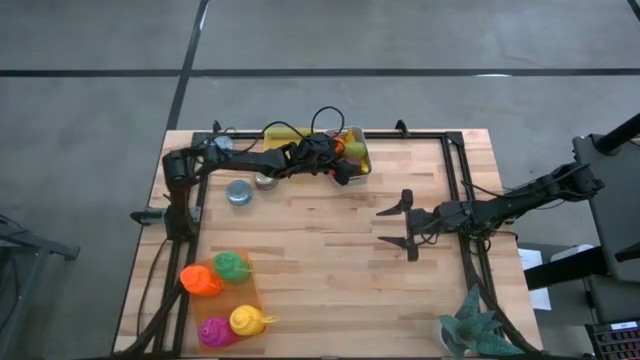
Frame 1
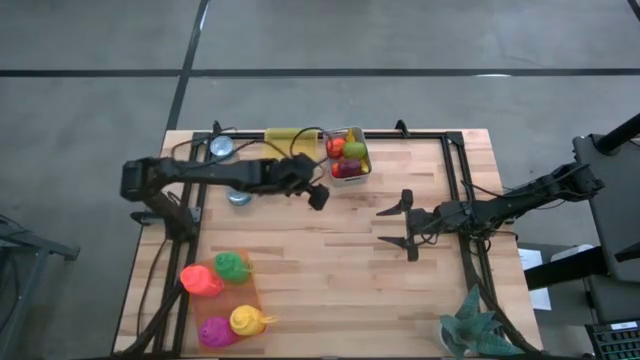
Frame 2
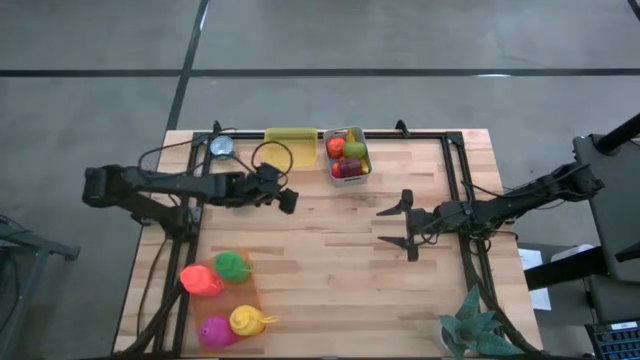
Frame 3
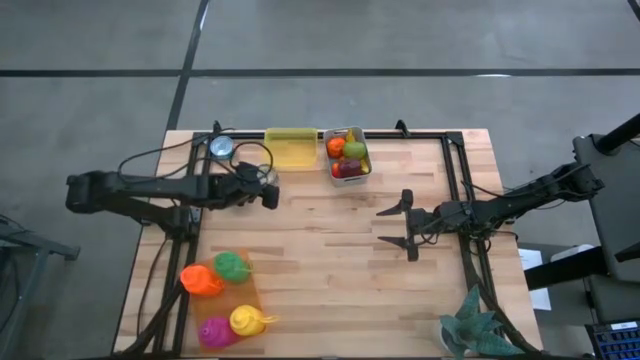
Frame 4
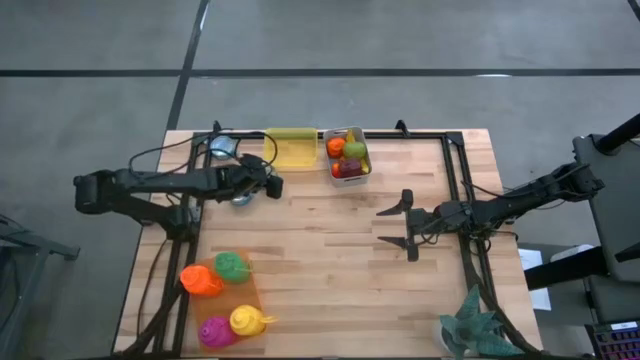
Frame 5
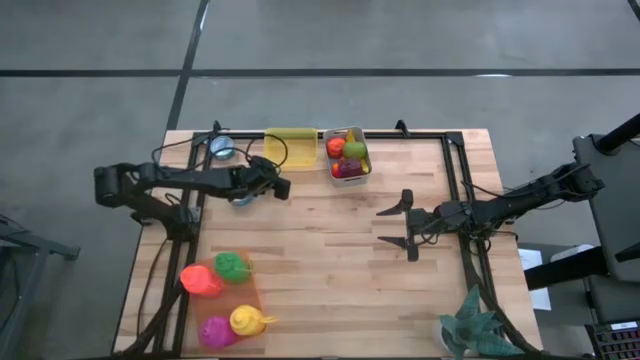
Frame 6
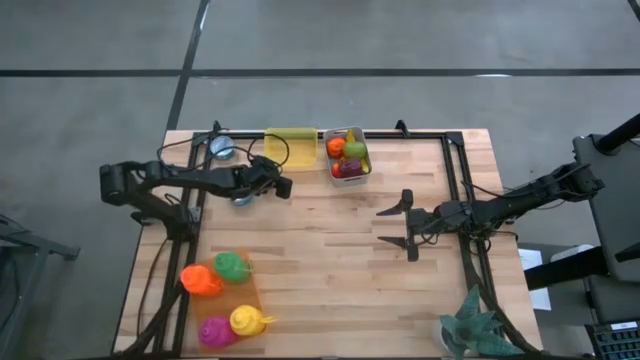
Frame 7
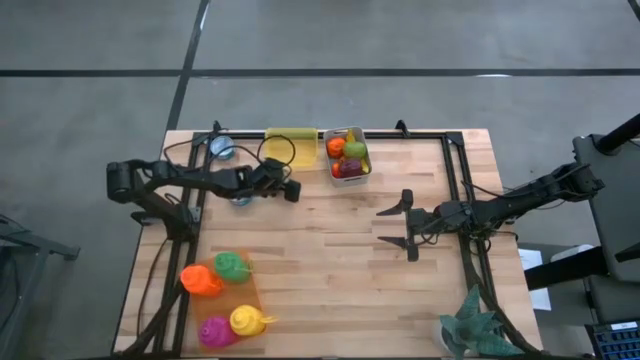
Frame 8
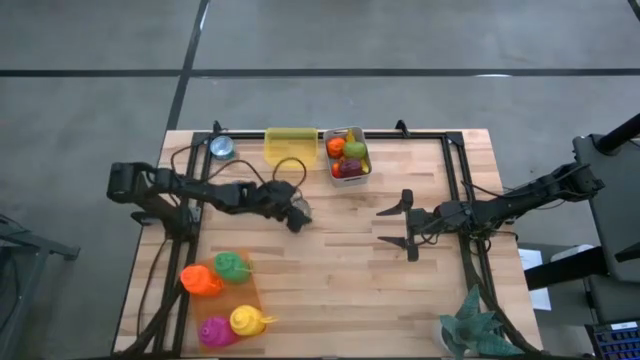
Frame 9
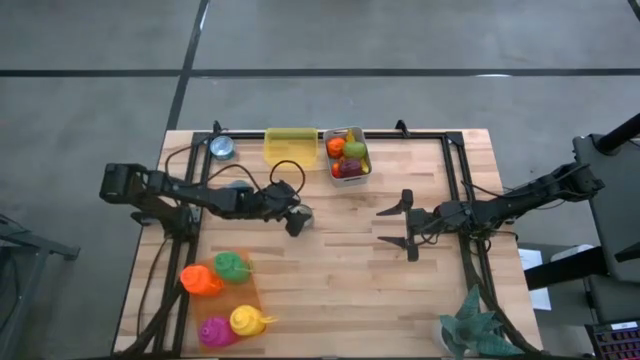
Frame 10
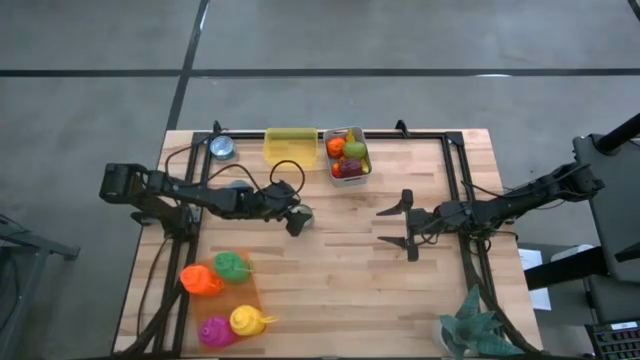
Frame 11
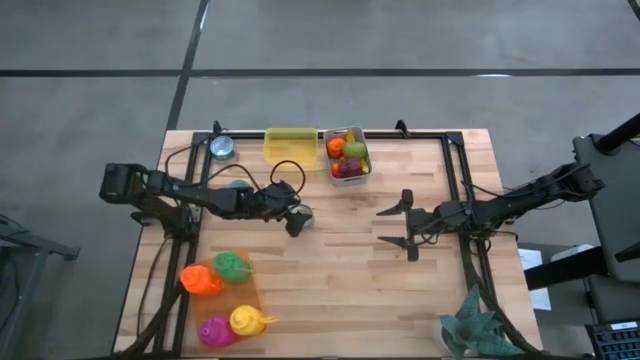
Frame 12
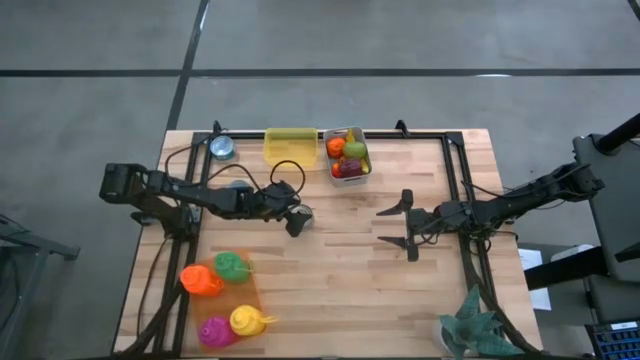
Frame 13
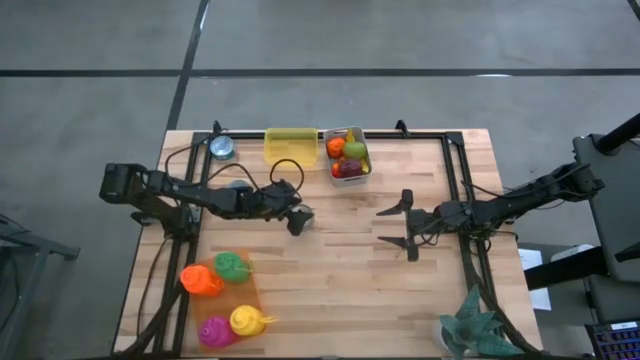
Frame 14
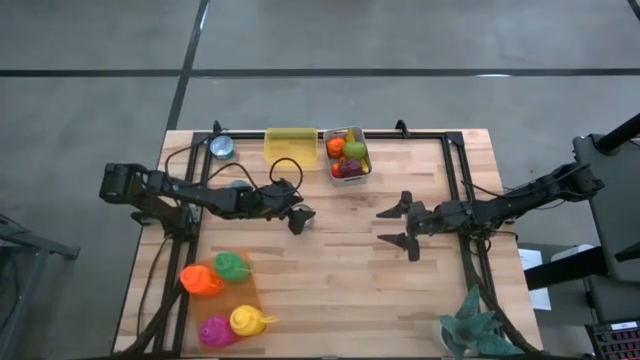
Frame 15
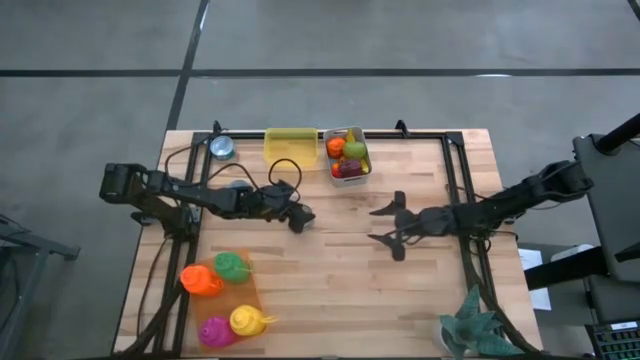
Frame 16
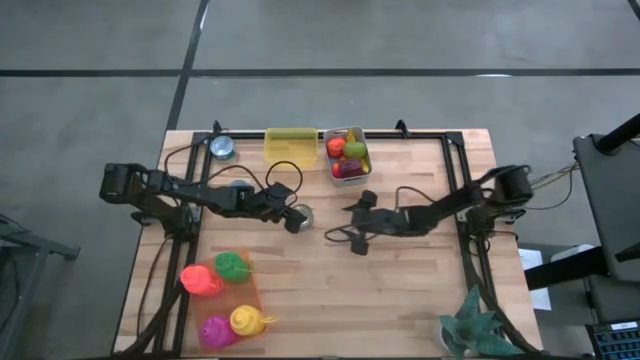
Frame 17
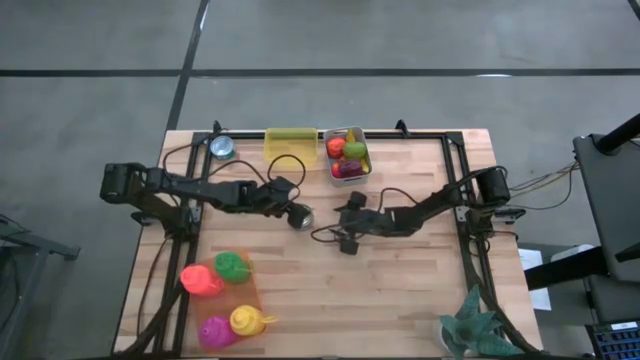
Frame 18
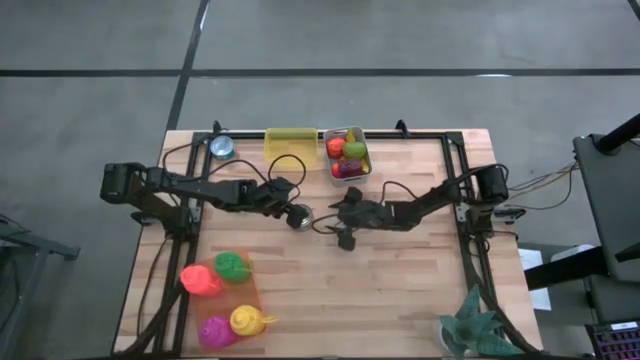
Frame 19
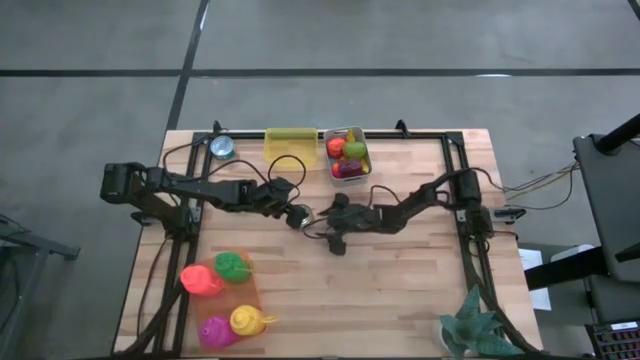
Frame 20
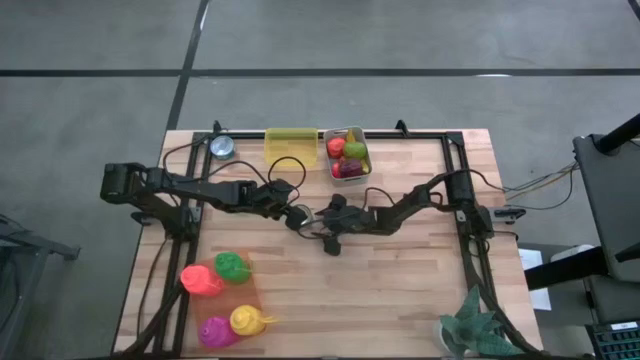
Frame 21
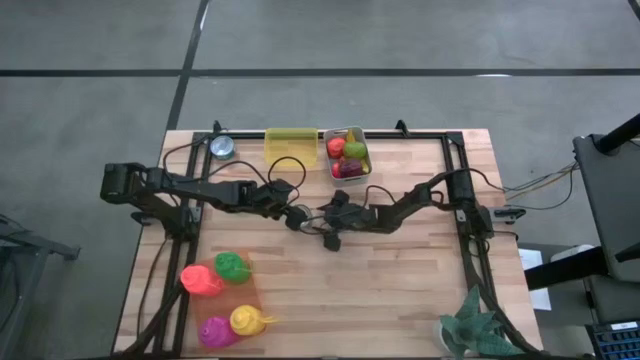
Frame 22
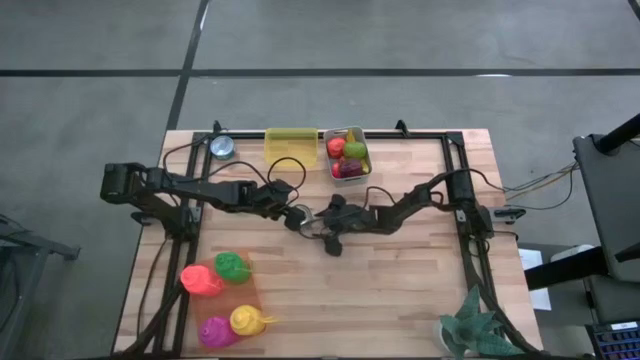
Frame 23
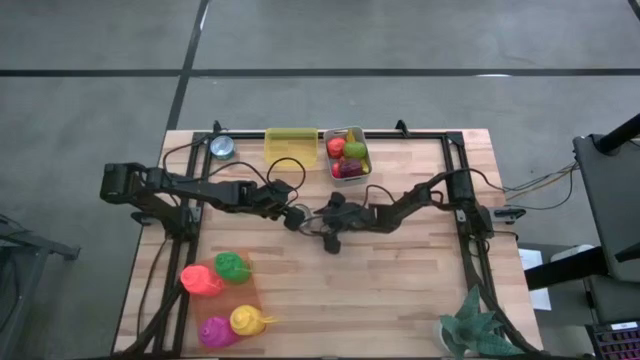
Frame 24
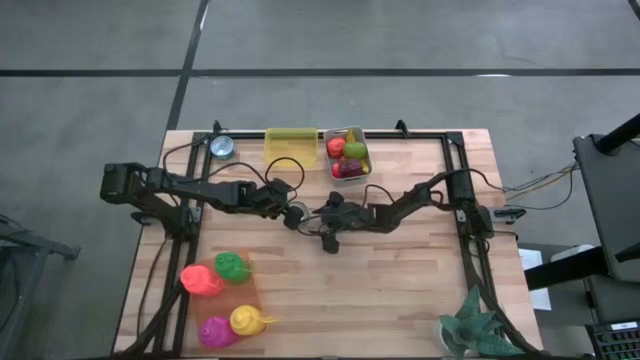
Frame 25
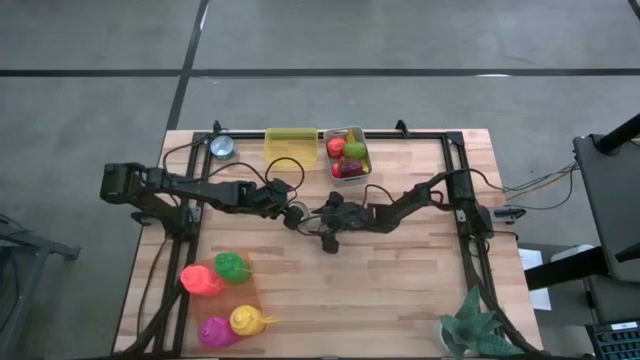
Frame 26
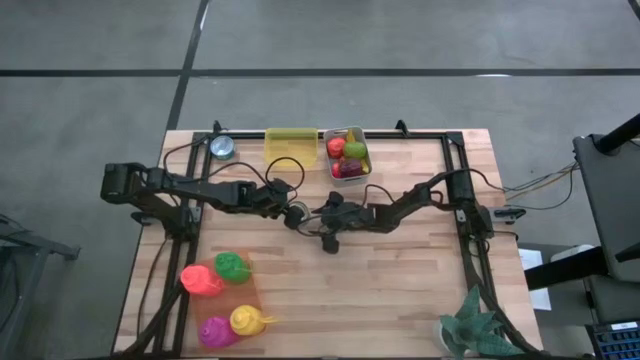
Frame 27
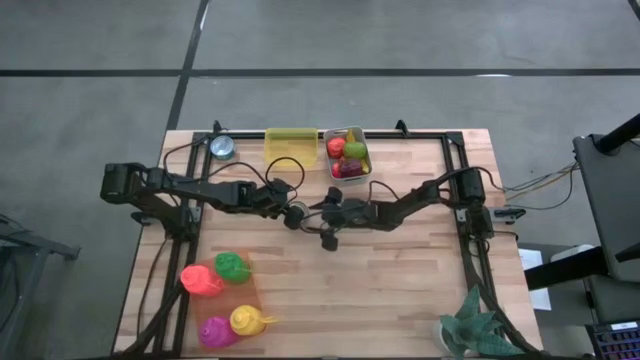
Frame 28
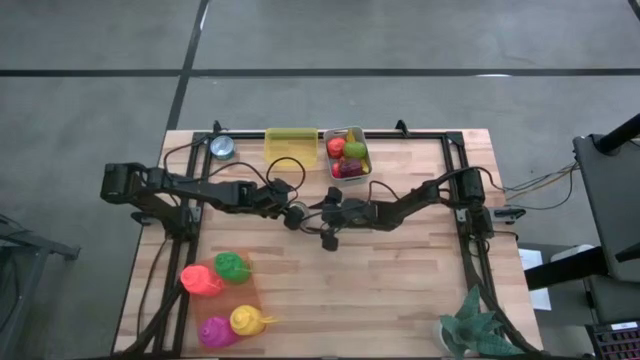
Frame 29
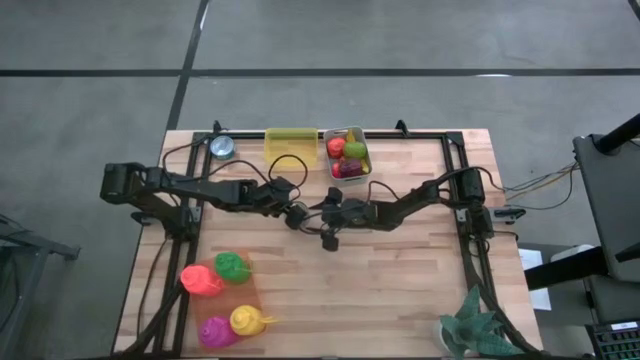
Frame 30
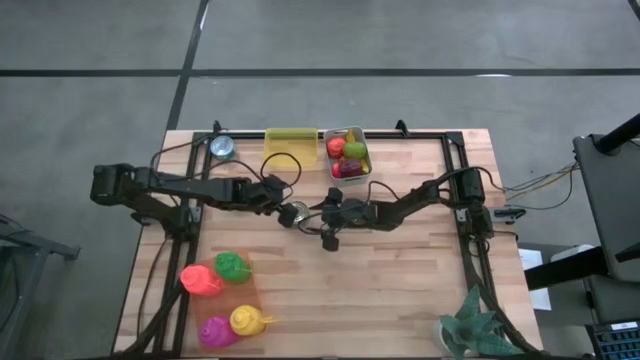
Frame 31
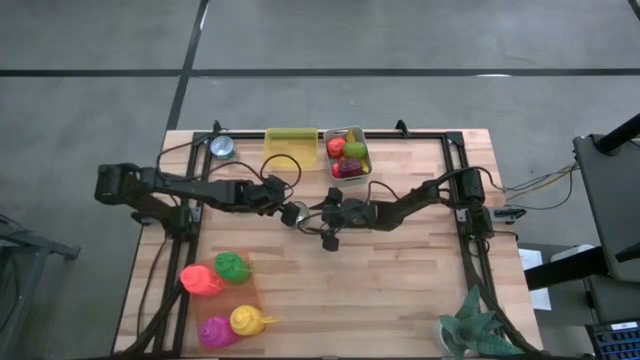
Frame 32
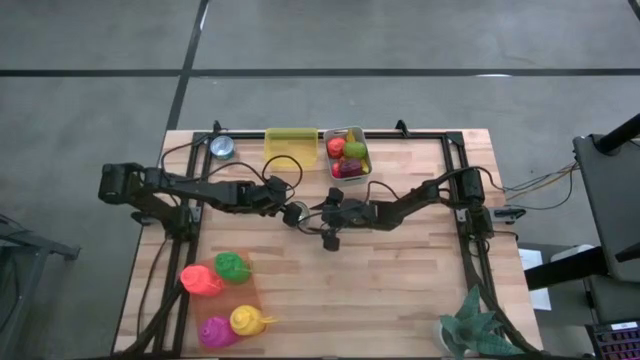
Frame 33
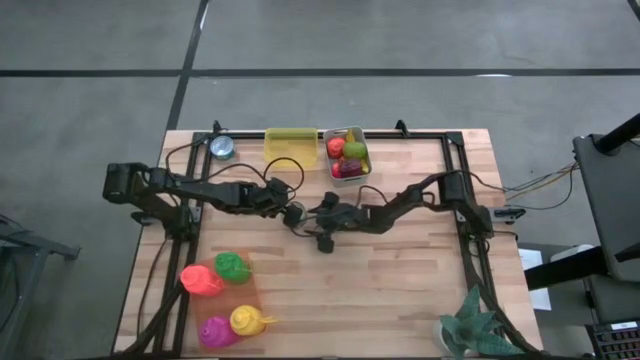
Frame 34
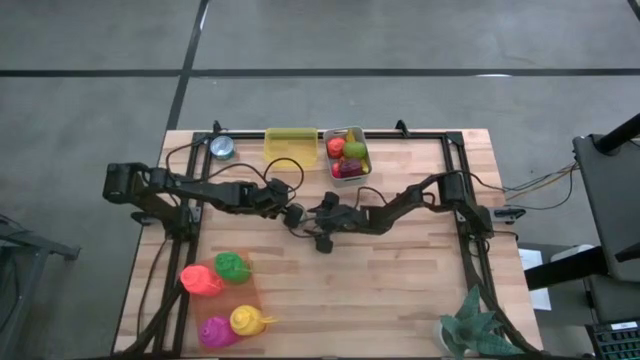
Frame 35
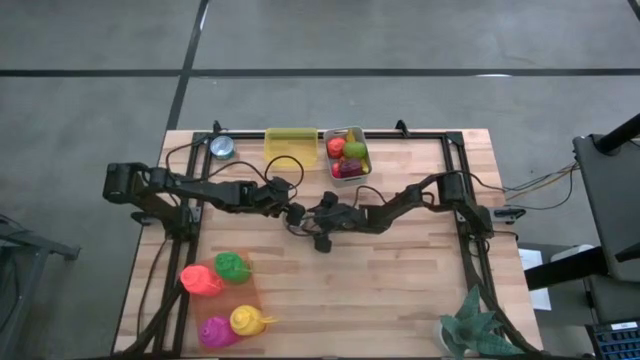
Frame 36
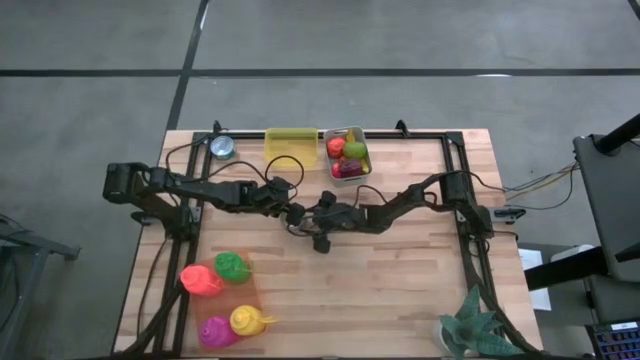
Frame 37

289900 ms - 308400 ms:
Task: Pick & Place Food Item
Put the blue and pink tuna can into the yellow bin

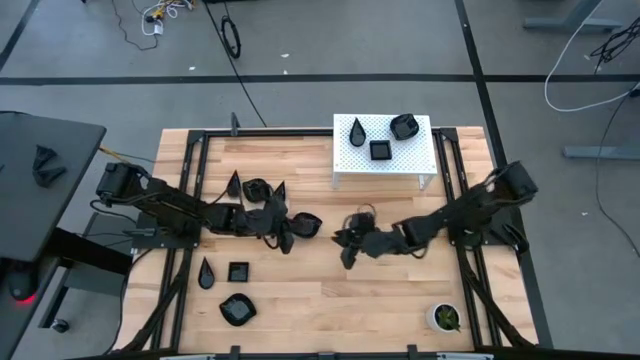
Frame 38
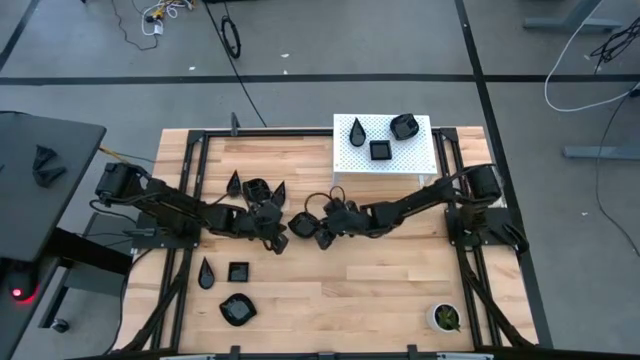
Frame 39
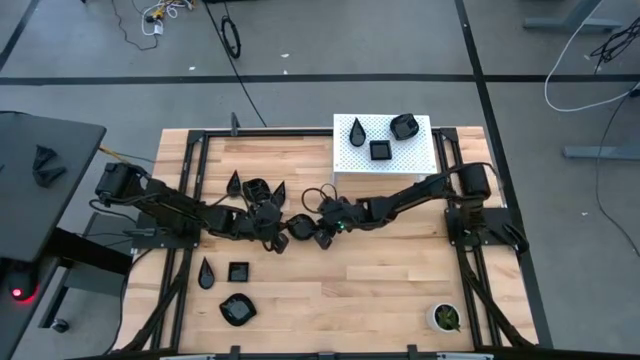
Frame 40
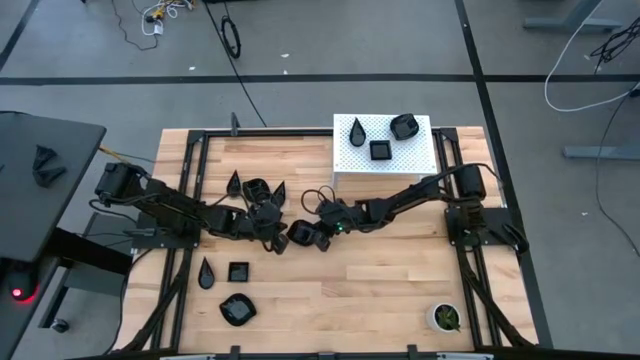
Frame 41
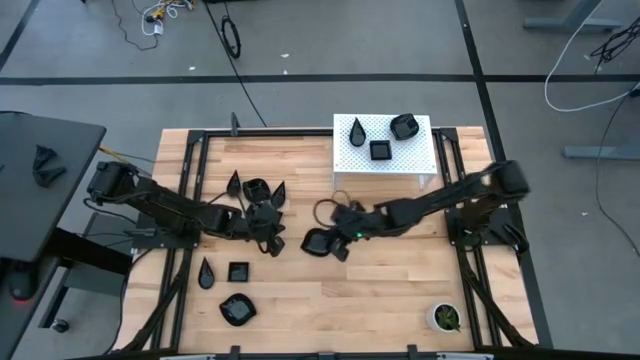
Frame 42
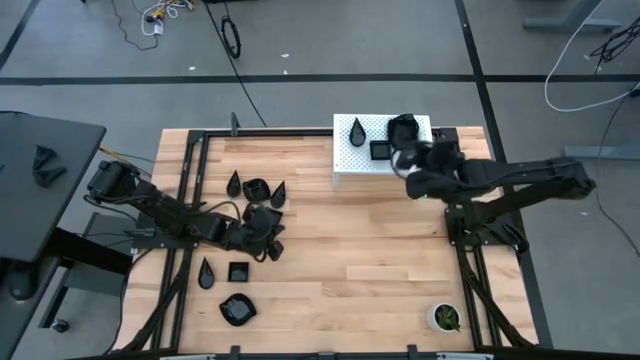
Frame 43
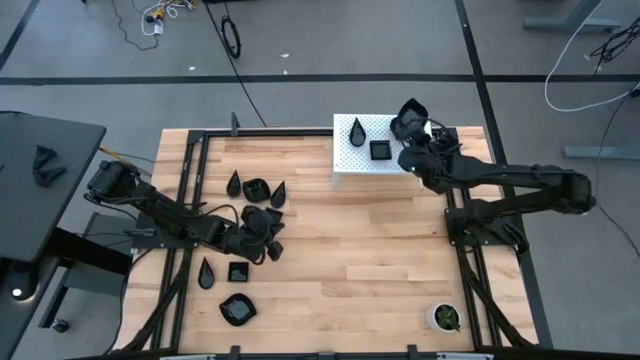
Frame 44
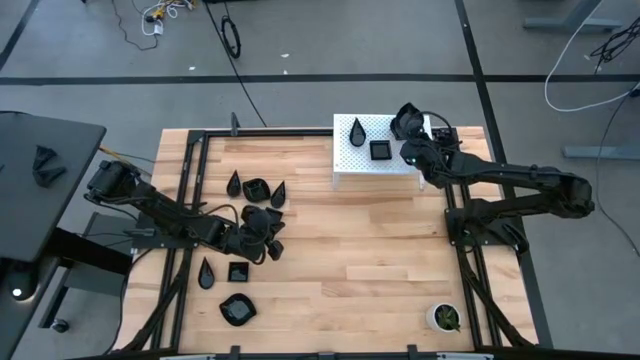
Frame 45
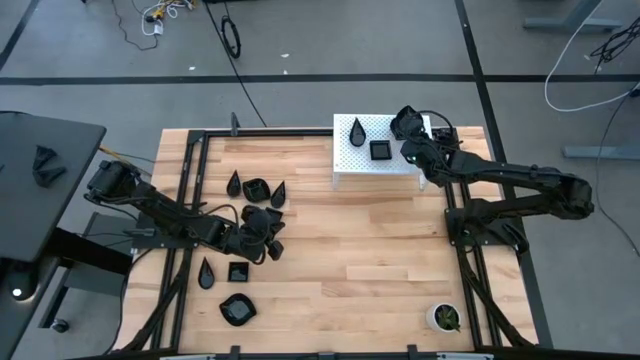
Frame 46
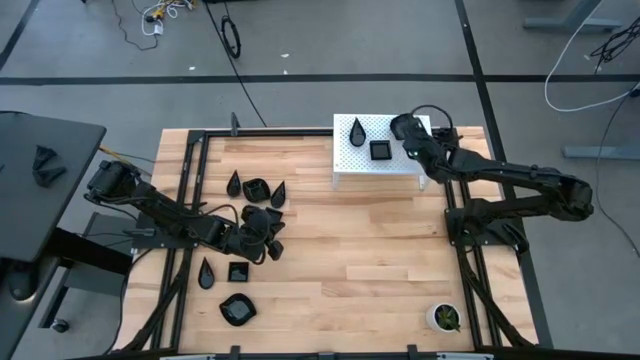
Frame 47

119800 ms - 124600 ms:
Task: Pick & Place Mini shaped plates
Stack the black leaf shaped plate on the black leaf shaped plate on the shelf
